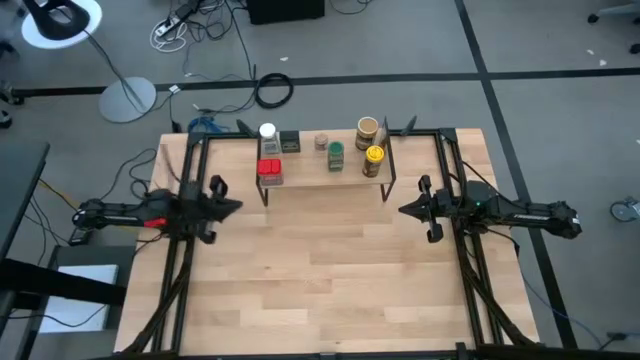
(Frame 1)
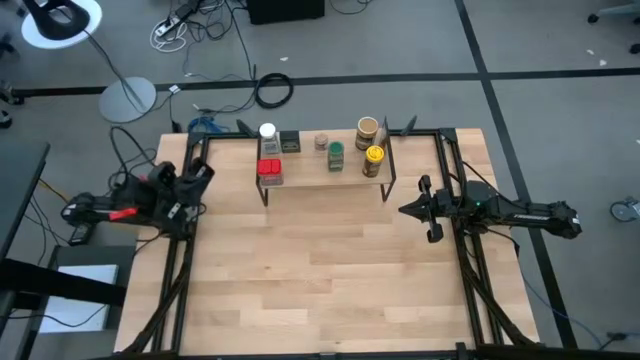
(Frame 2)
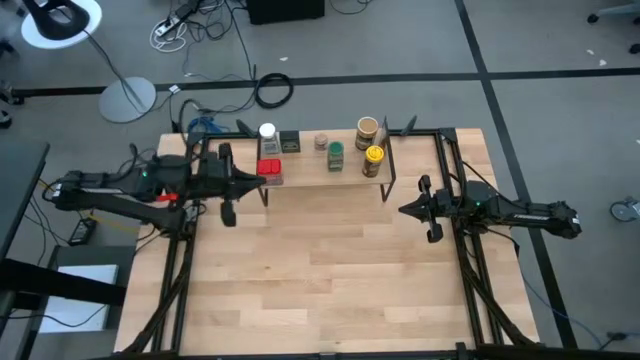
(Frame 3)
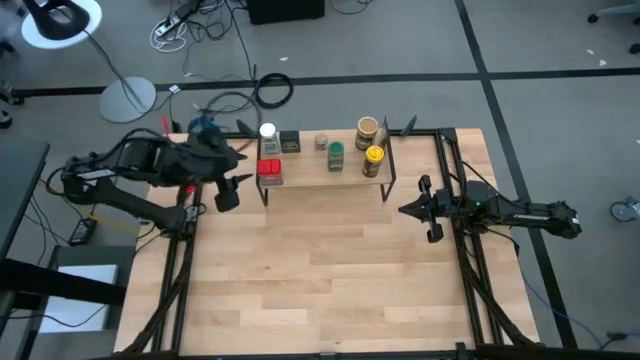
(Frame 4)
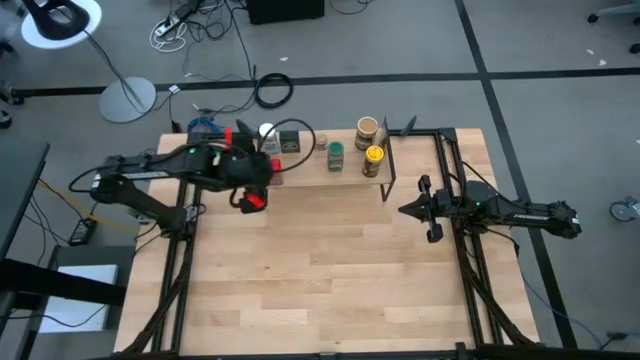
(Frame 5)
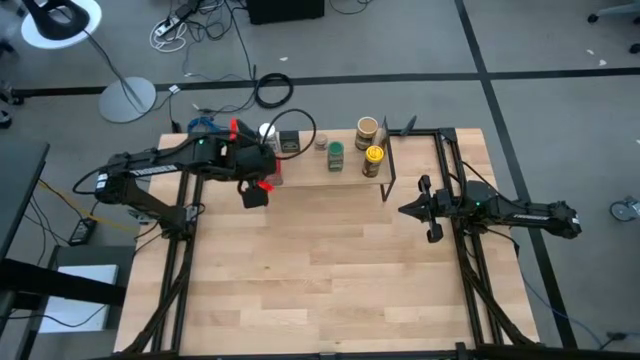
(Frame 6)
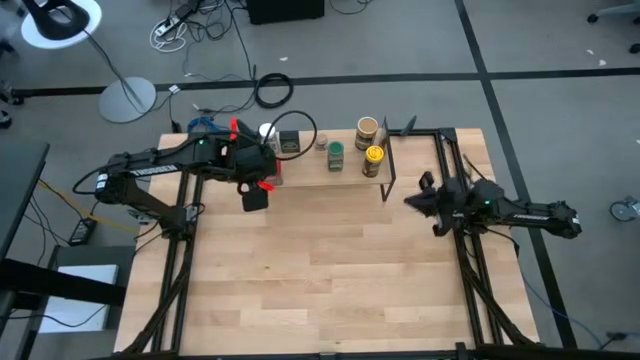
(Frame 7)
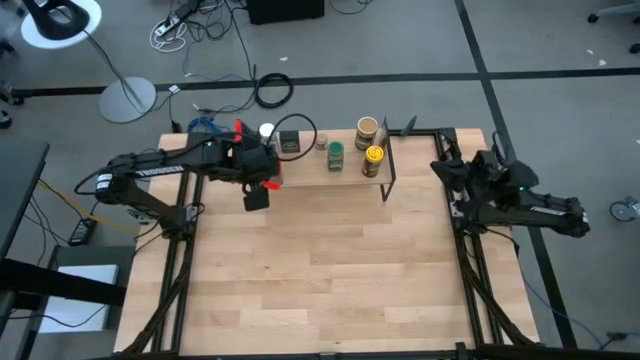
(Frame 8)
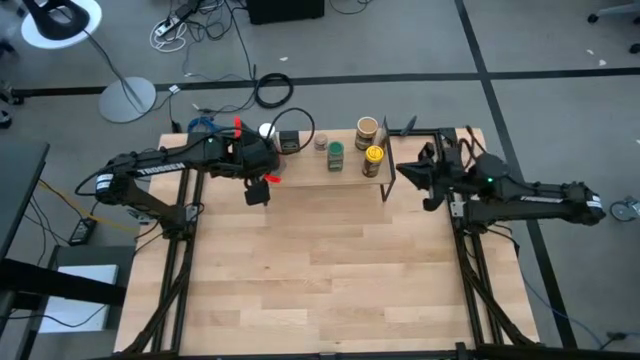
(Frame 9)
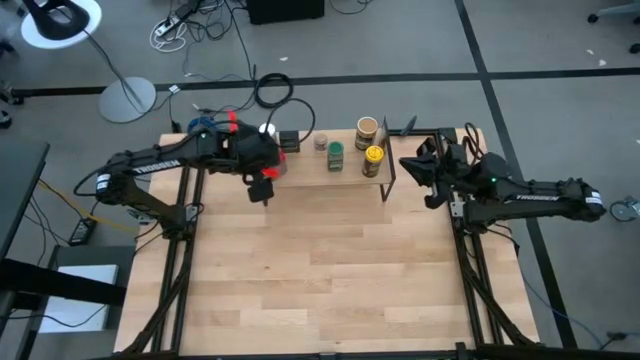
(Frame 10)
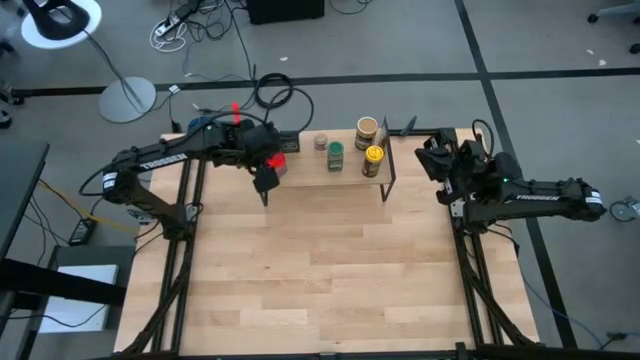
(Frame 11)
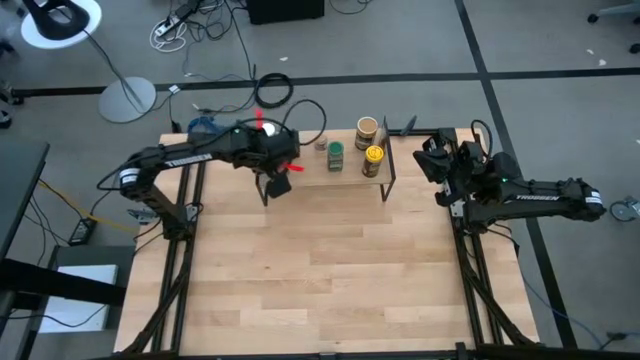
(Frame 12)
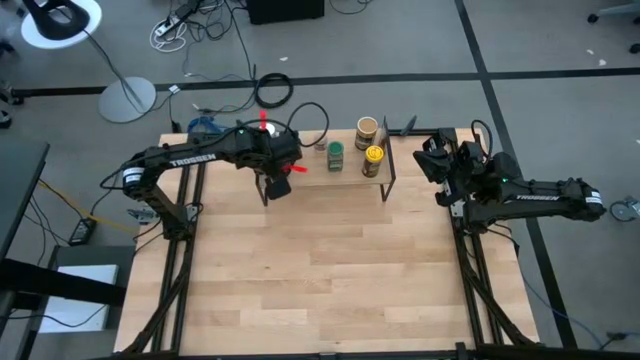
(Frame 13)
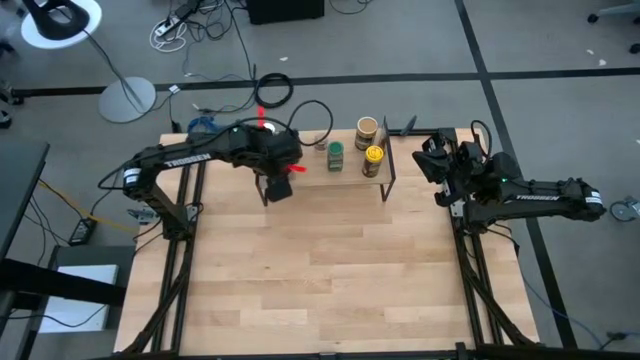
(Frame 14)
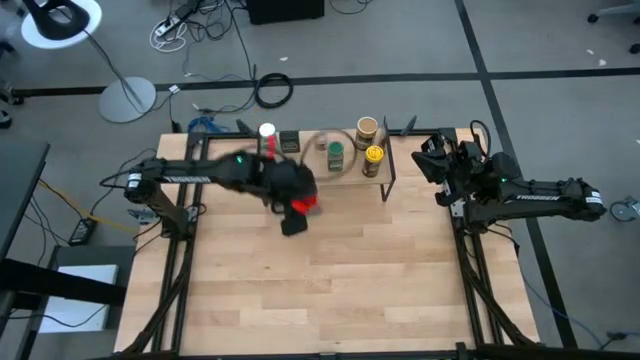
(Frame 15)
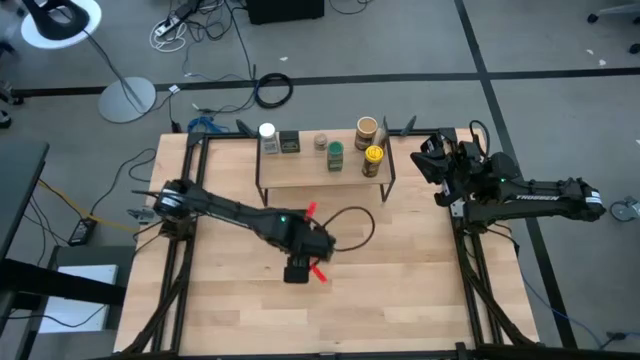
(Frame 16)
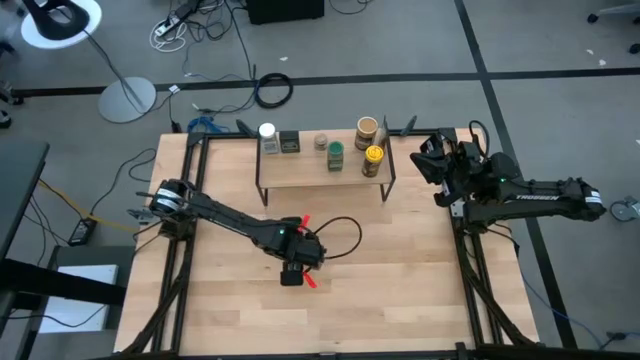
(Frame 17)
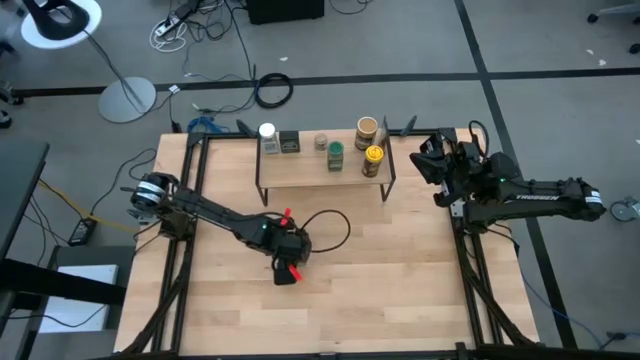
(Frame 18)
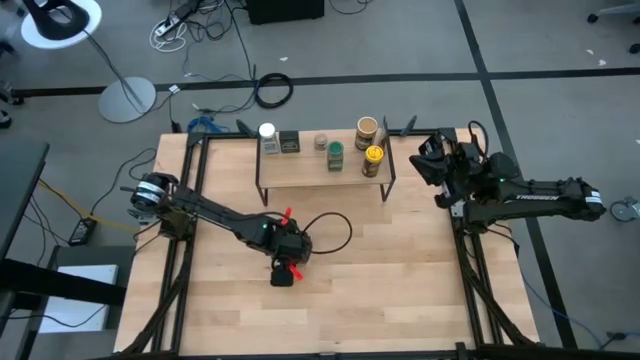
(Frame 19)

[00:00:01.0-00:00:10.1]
Task: Shelf spices
Remove the red seasoning can from the shelf

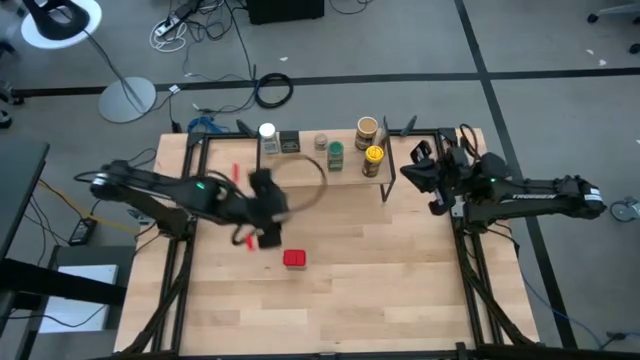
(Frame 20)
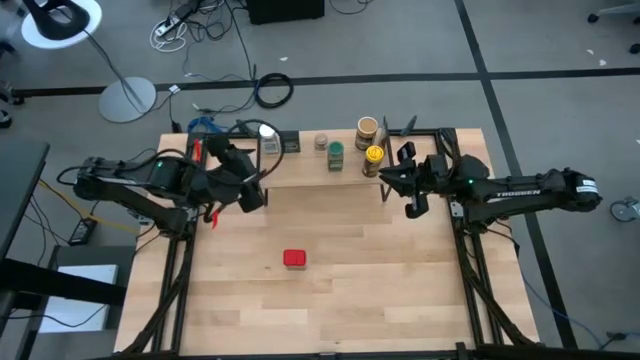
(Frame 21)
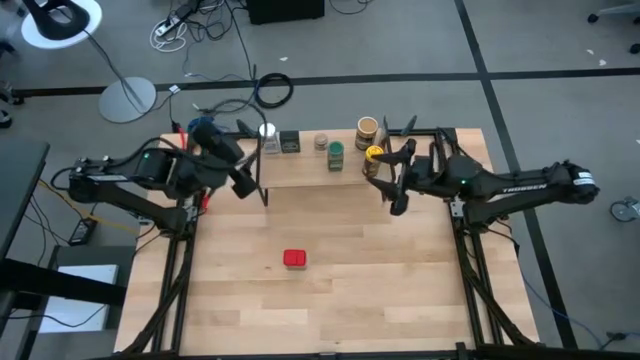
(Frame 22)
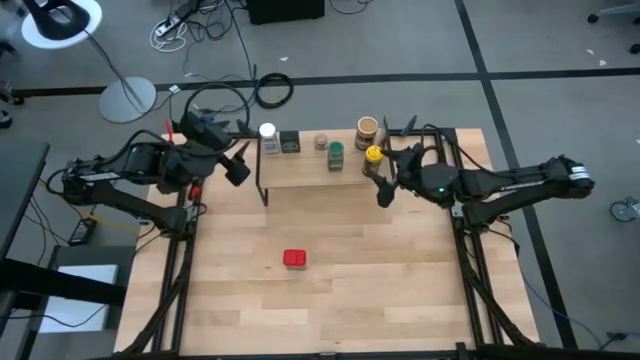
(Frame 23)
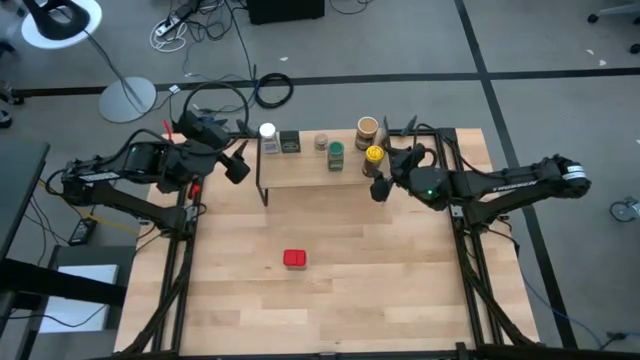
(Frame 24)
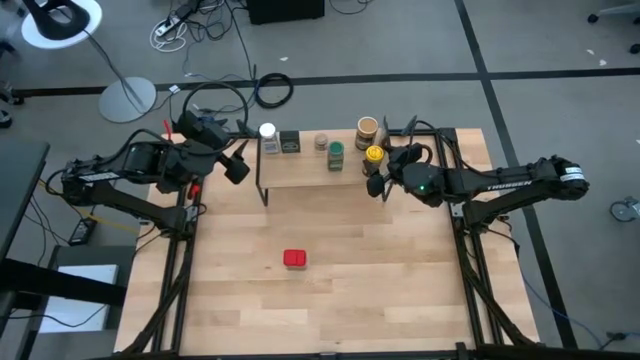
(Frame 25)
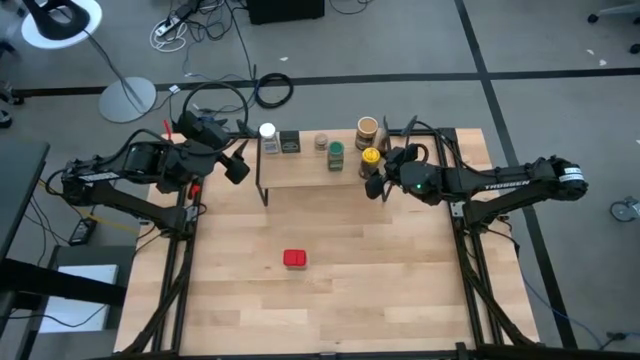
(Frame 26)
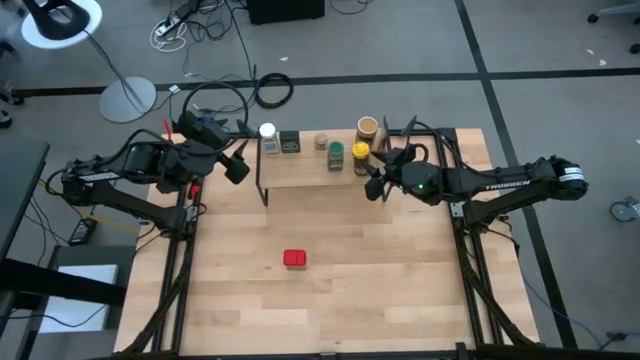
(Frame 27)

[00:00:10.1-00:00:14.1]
Remove the yellow seasoning can from the shelf

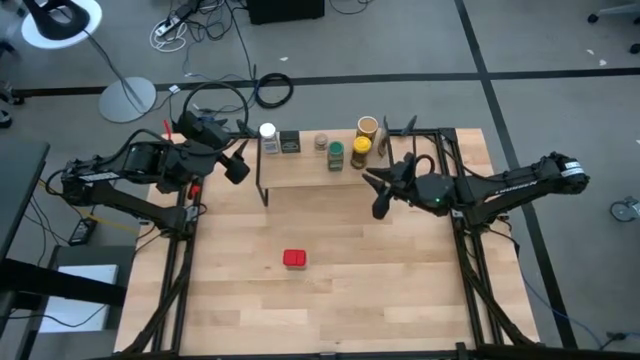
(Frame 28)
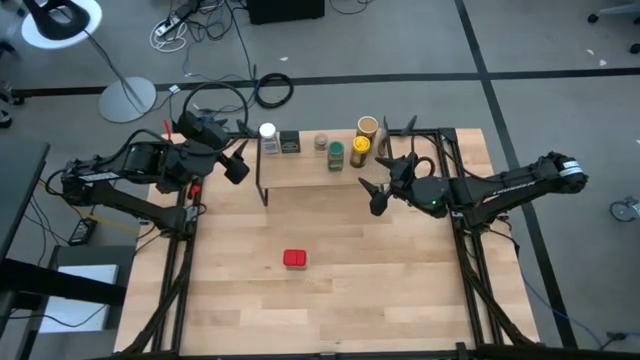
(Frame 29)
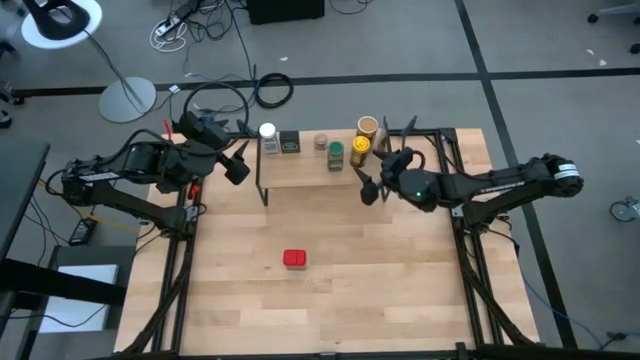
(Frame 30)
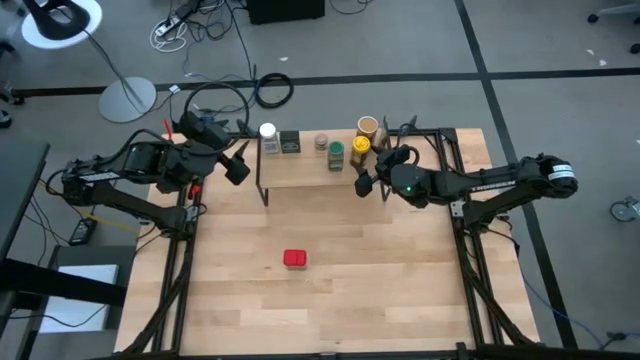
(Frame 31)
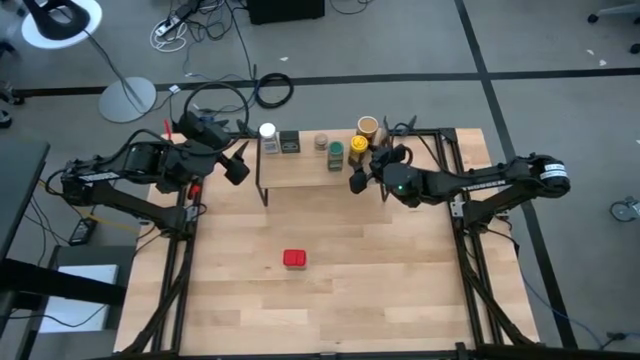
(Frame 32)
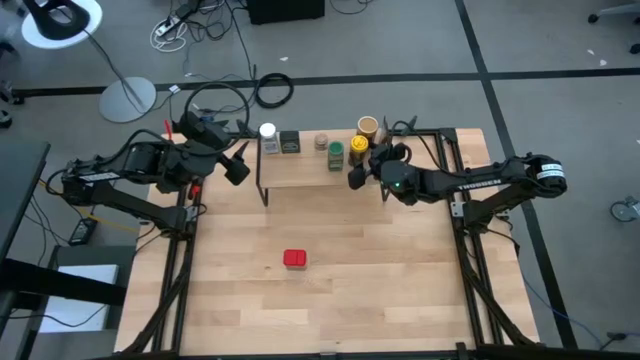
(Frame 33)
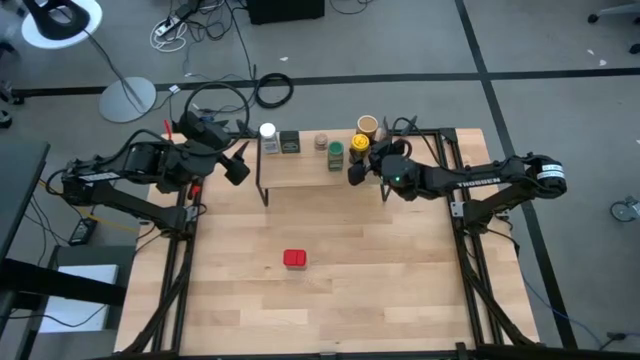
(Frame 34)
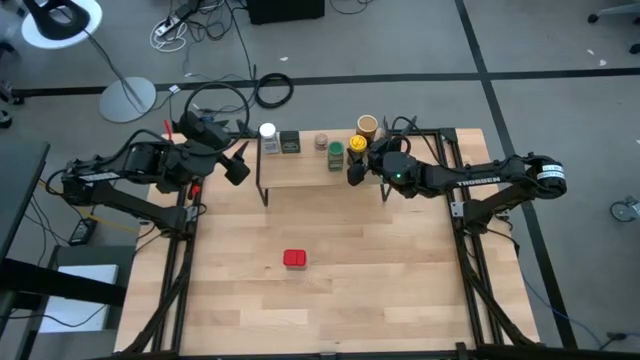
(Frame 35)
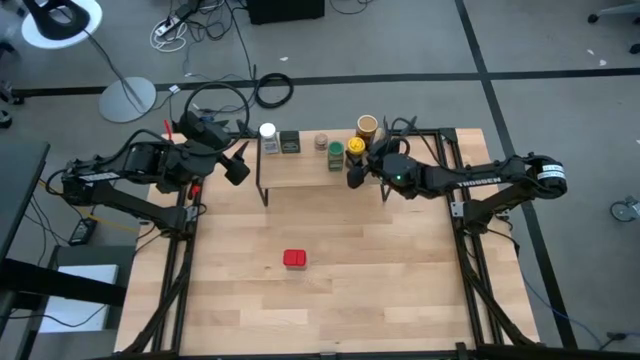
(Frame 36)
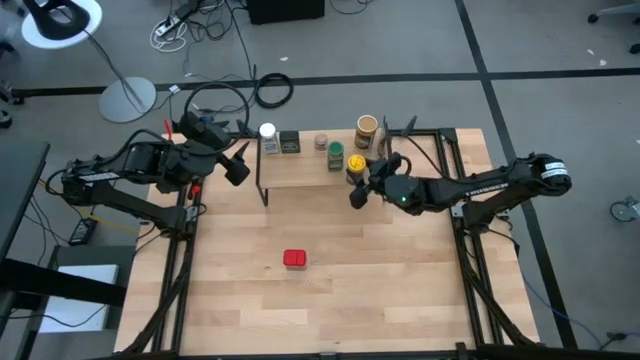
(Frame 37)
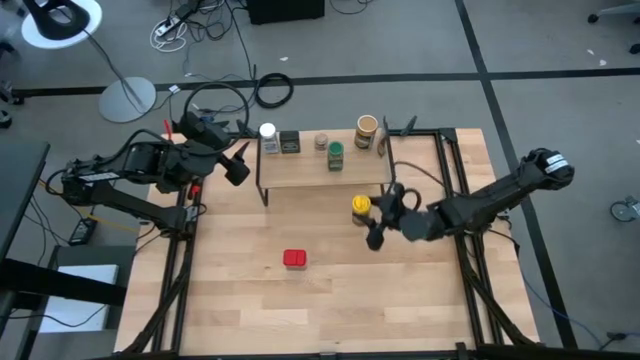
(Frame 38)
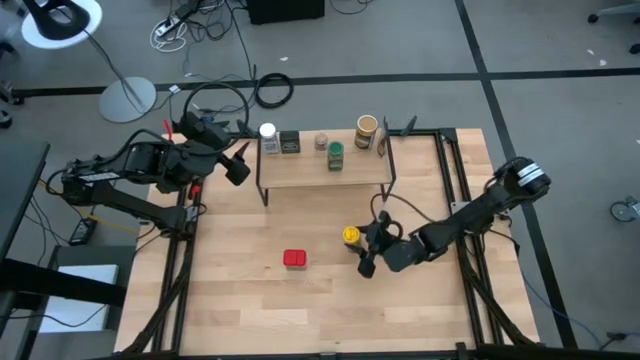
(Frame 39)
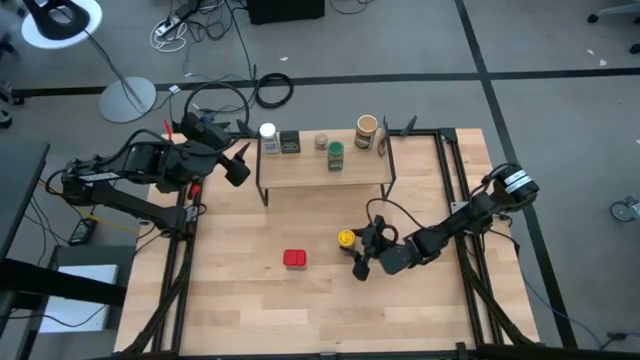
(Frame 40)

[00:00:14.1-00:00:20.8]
Remove the yellow seasoning can from the shelf

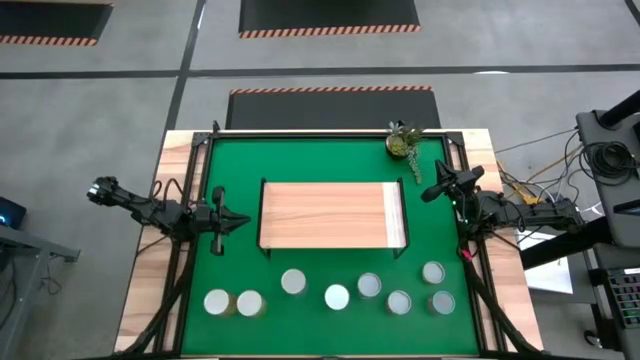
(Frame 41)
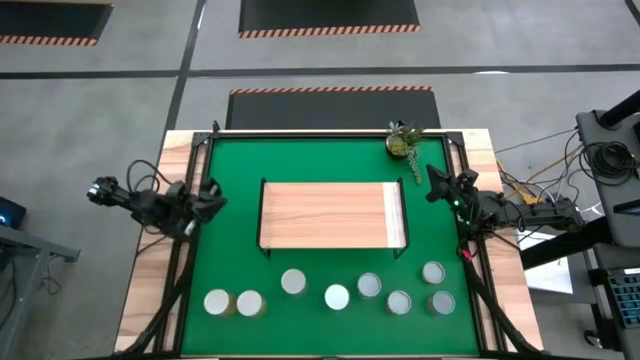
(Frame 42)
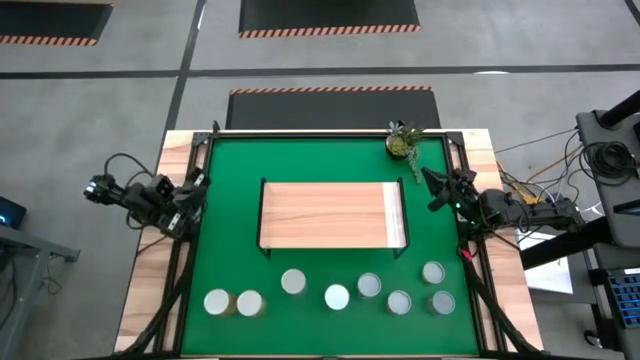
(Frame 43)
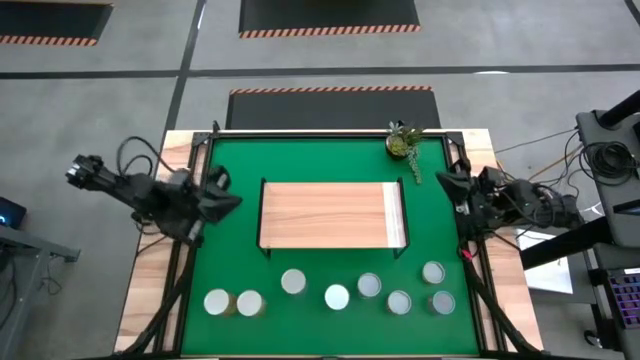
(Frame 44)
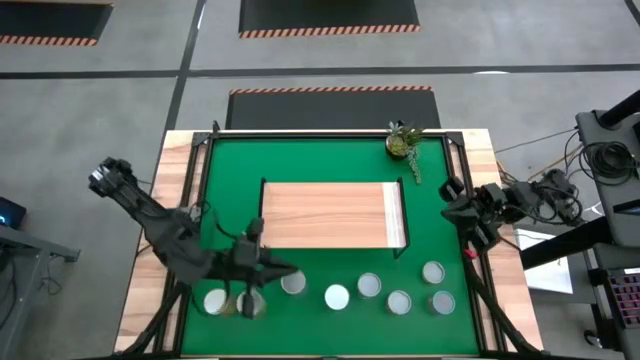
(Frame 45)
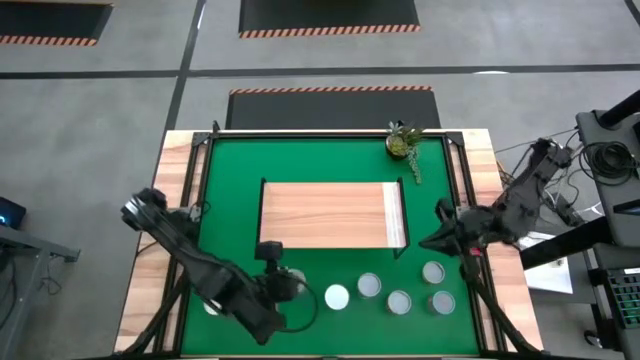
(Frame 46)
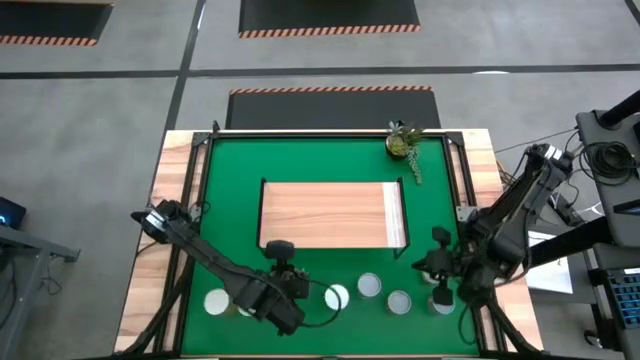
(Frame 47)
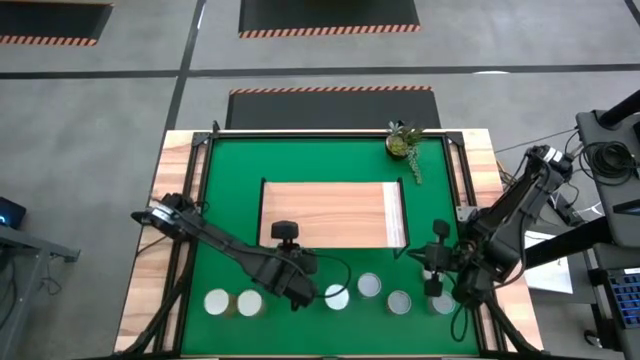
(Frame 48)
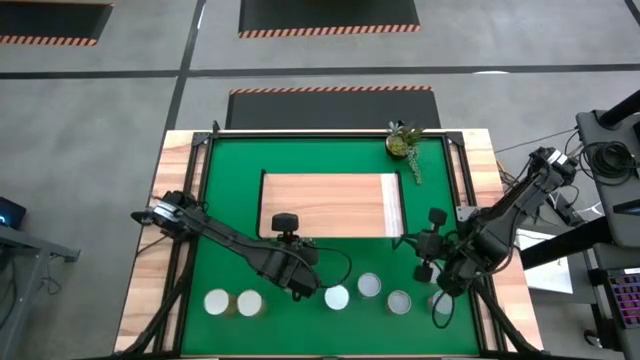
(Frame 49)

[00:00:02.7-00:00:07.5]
Task: Pick and place cans onto a shelf
Adjust the shelf
